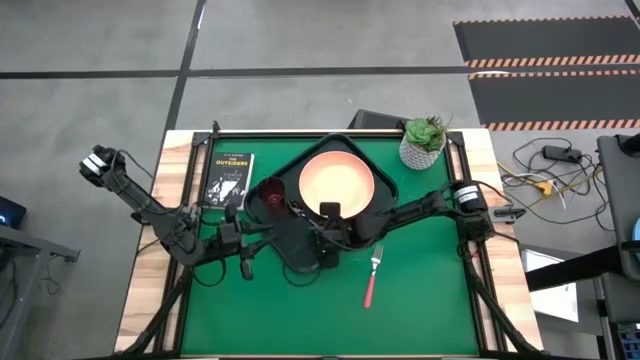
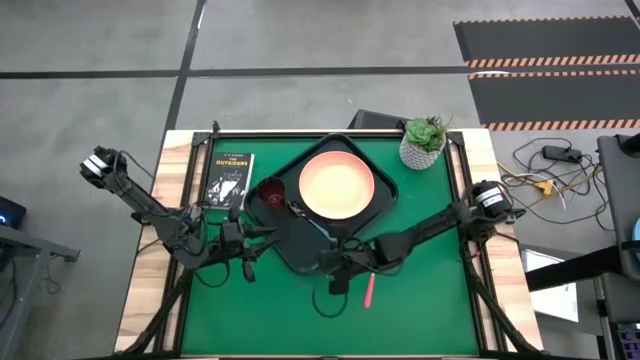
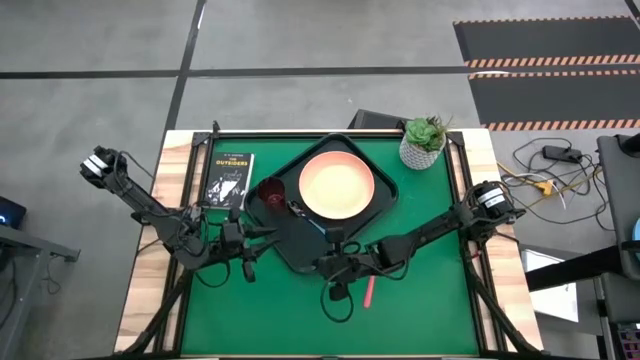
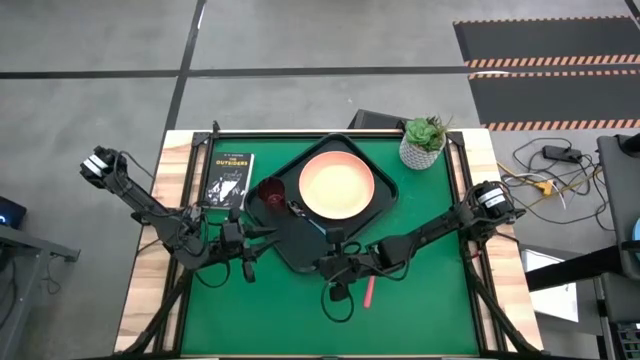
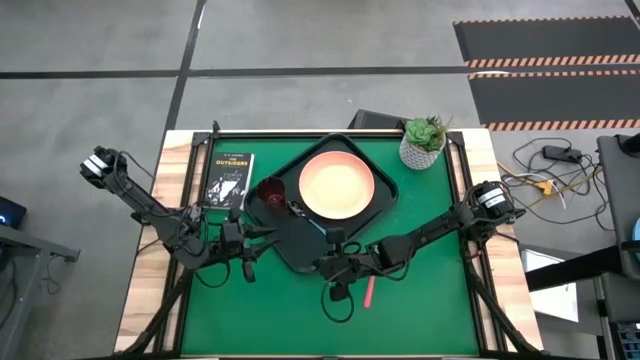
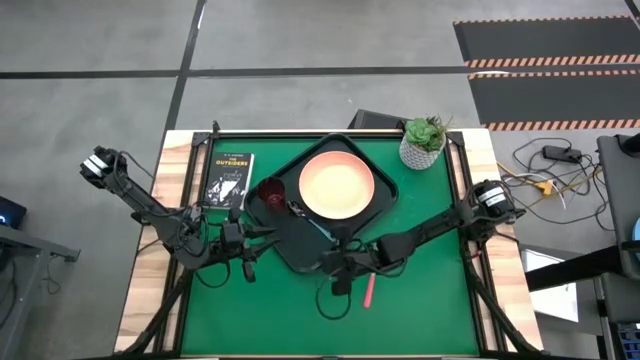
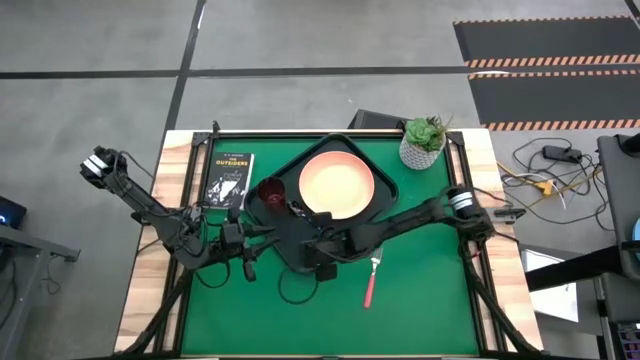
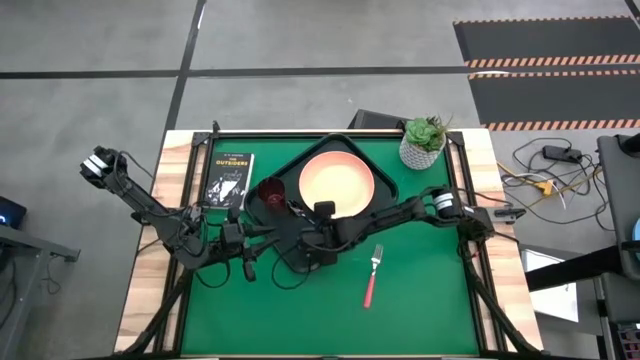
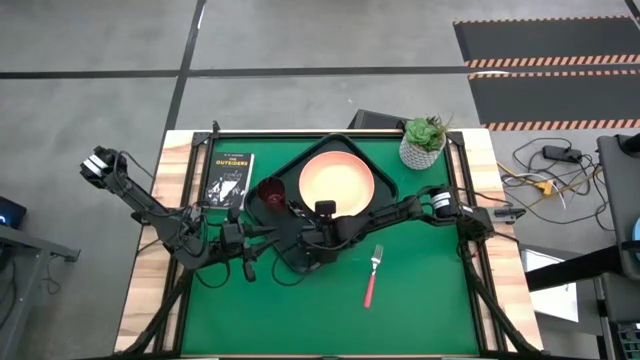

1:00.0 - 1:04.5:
Task: Pick and place plate/cup/fork/spoon on tray
Adjust the blue spoon on the black serving tray

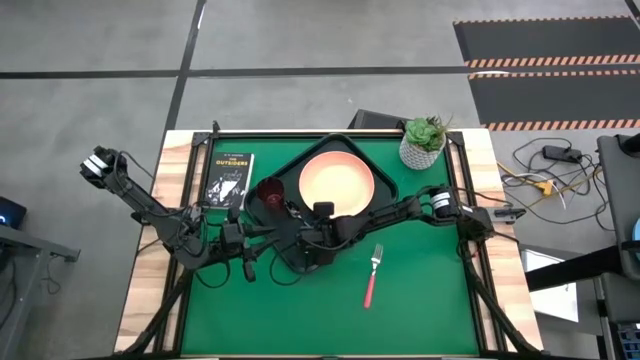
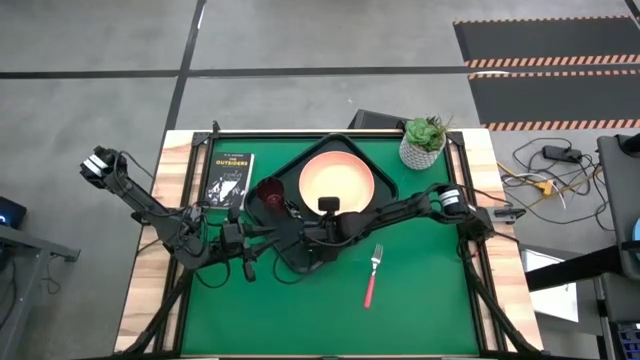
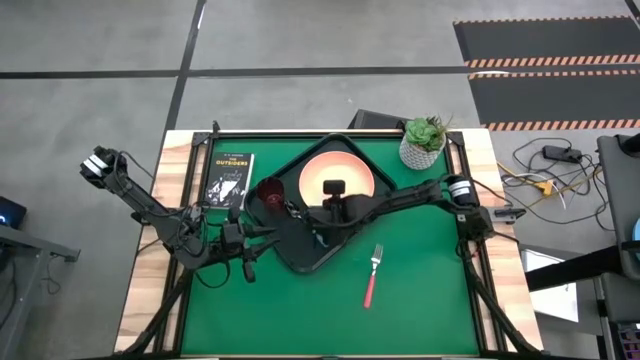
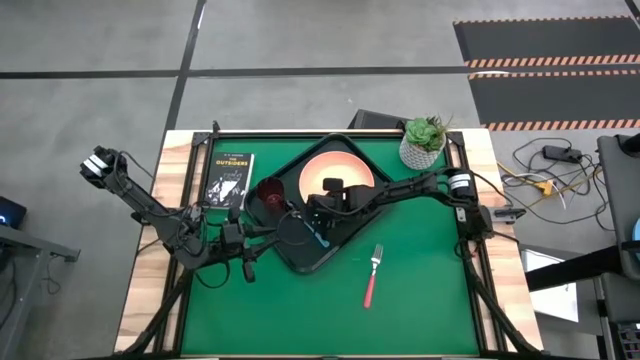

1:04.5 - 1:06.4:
Adjust the orange plate on the black serving tray

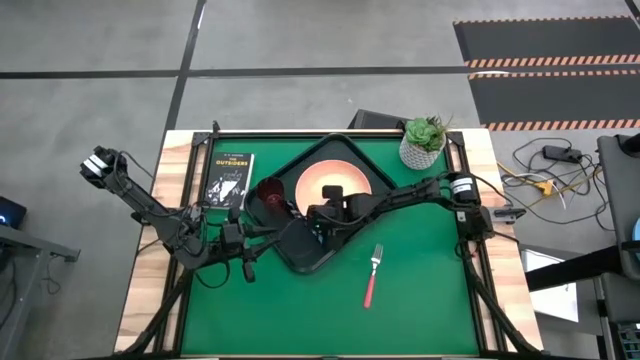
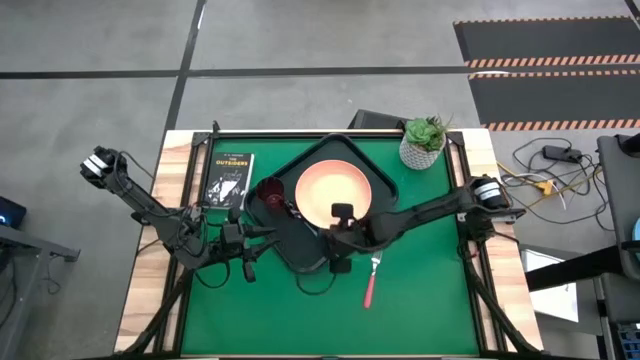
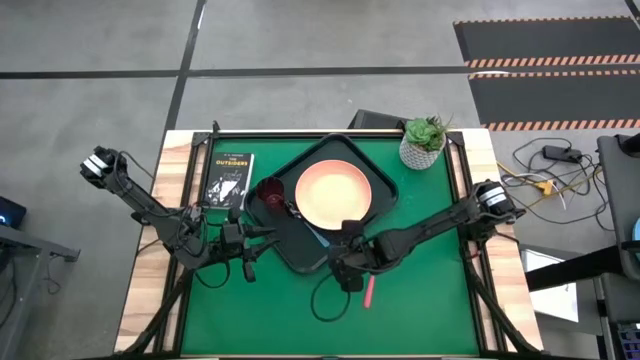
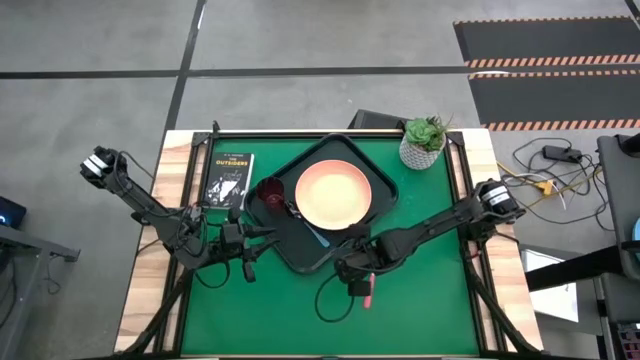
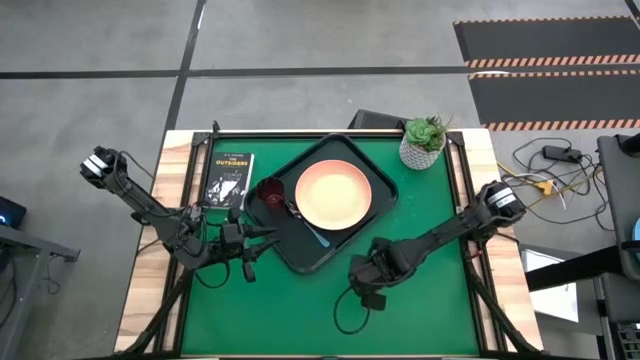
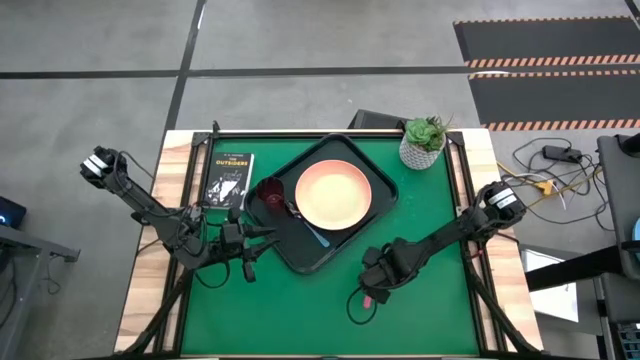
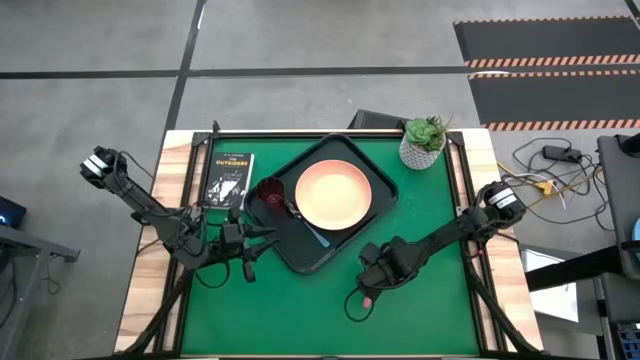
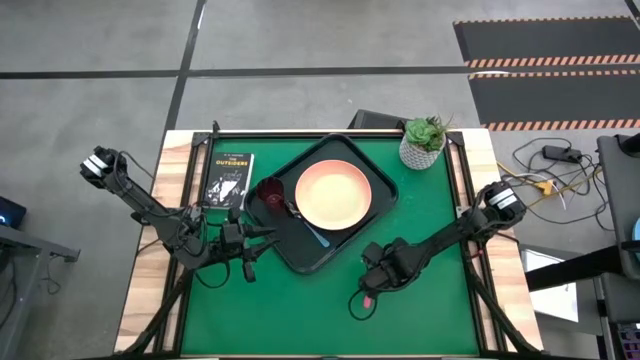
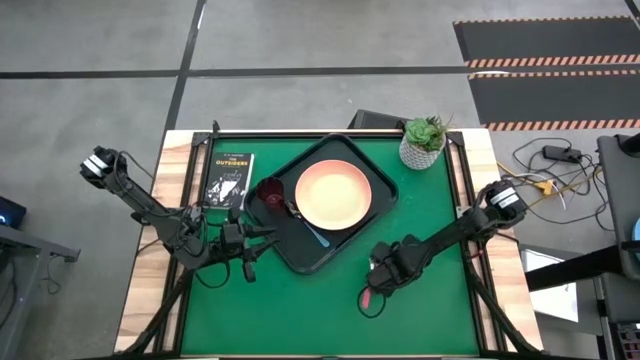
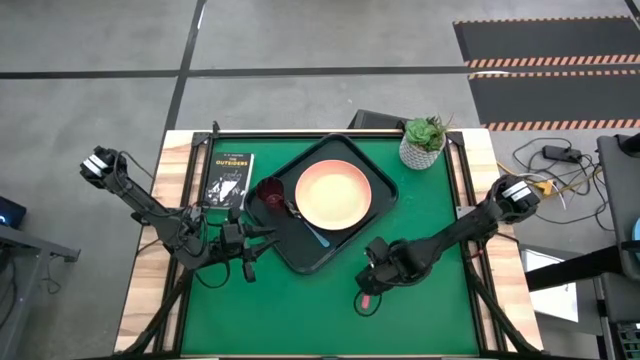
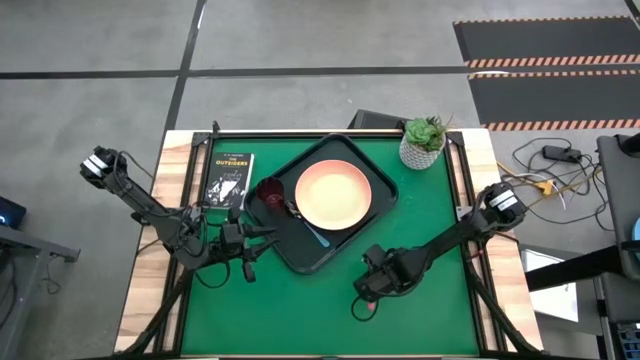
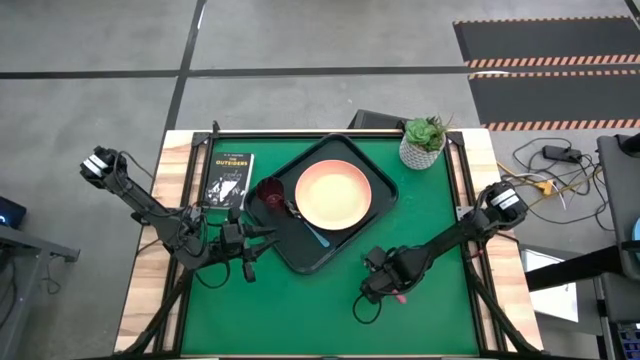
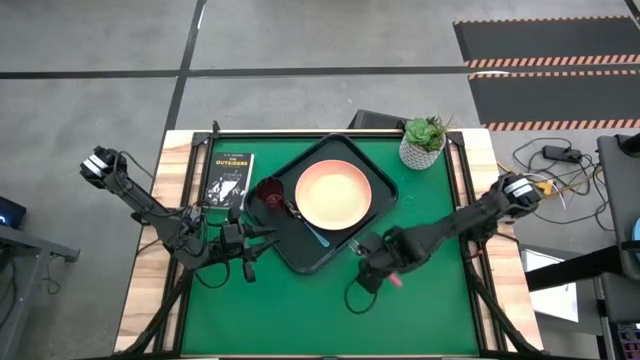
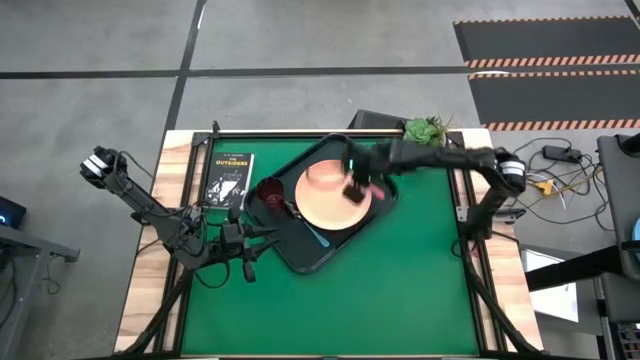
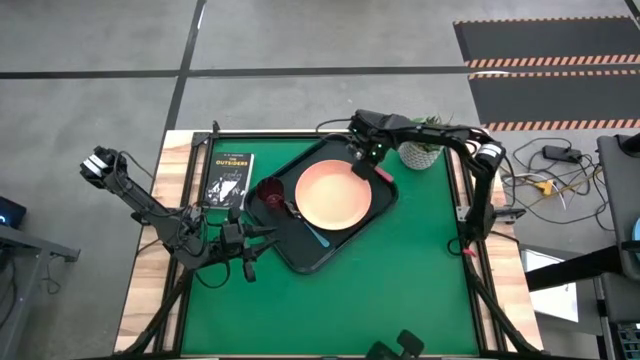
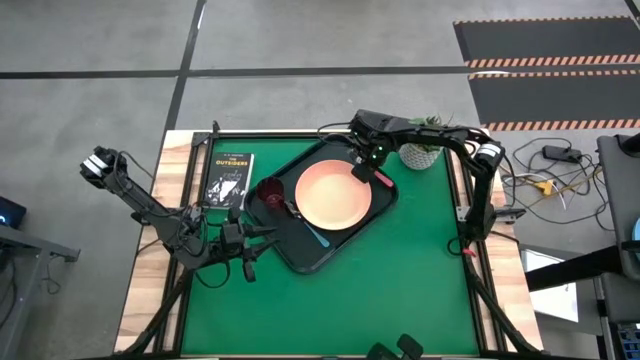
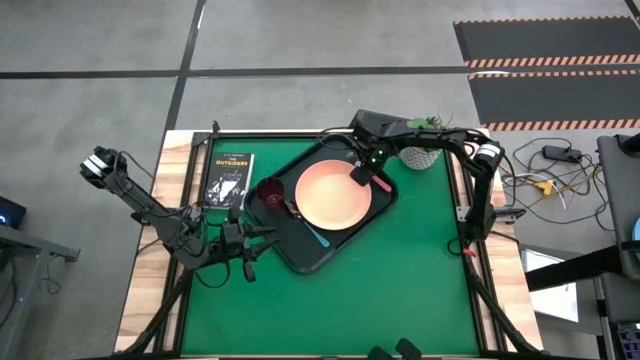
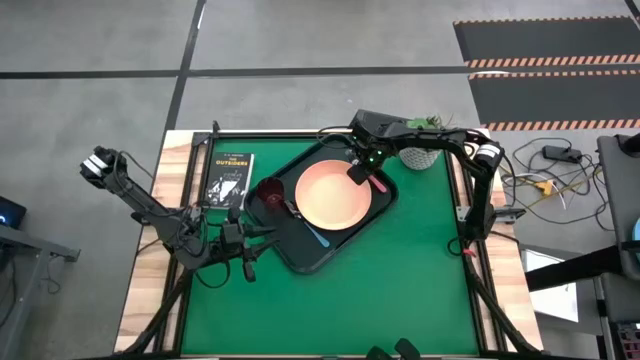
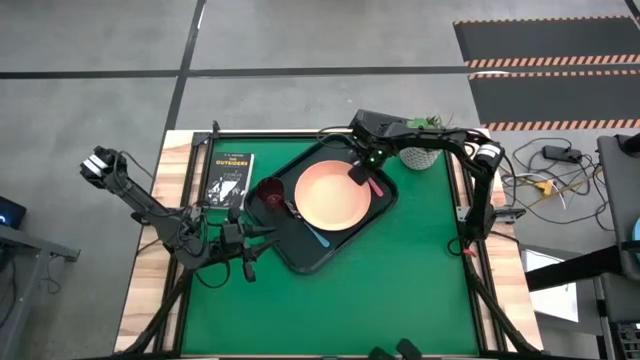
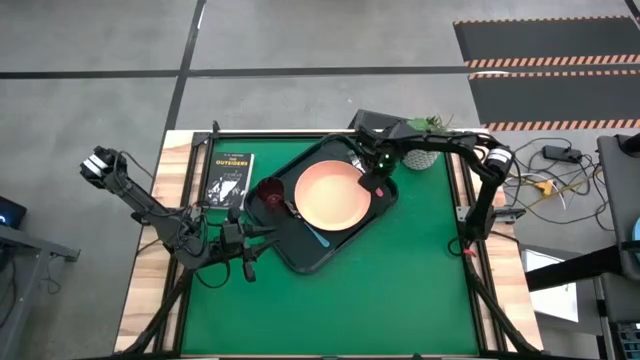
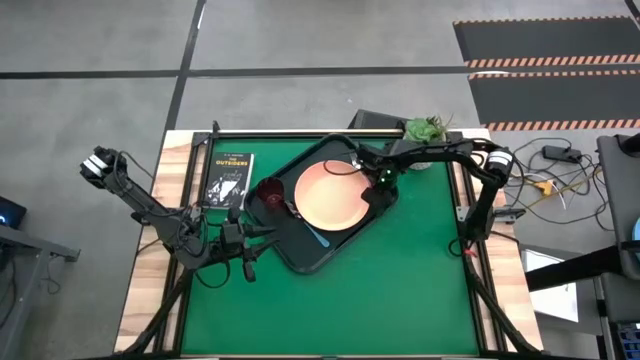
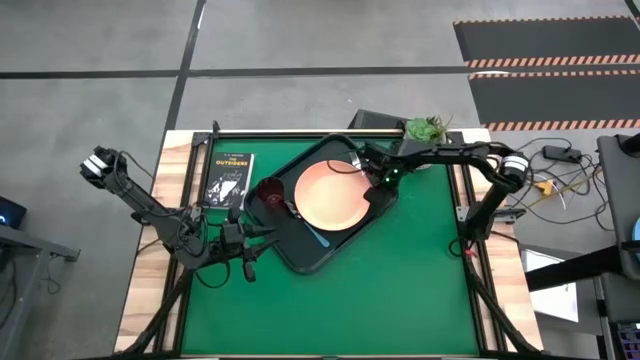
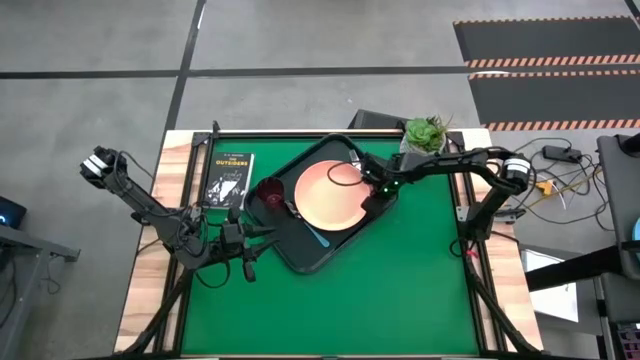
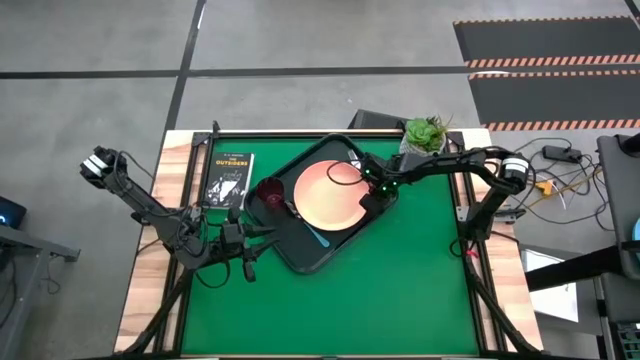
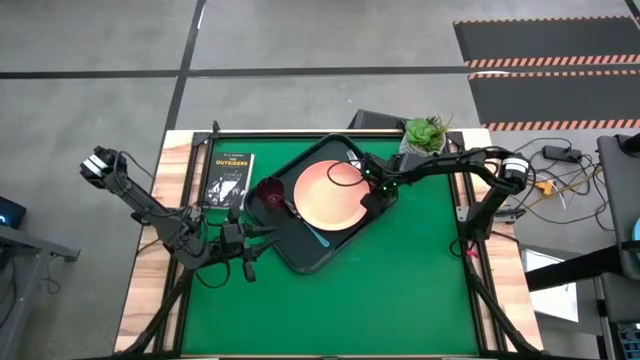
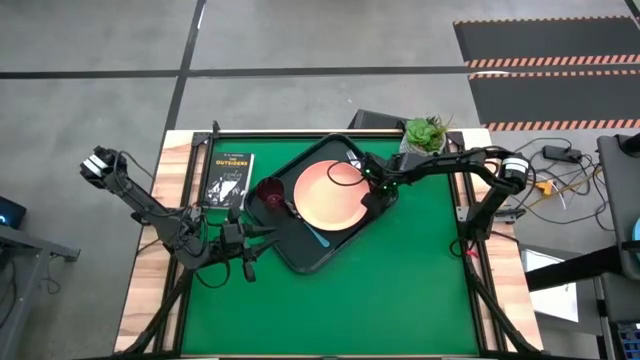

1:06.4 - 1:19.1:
Put the red fork on the black serving tray to the right of the orange plate

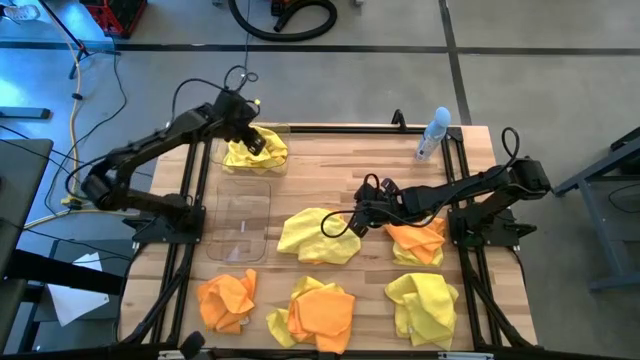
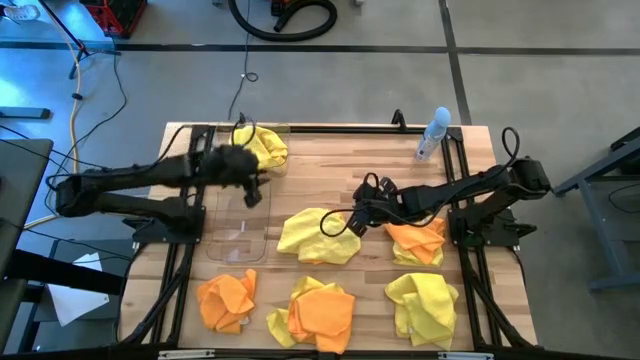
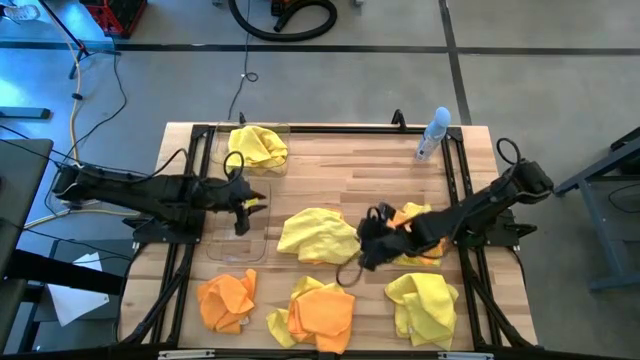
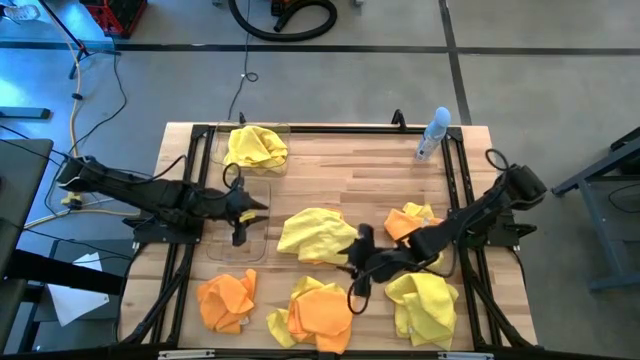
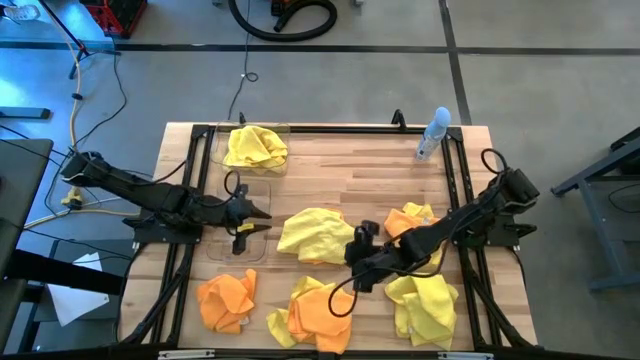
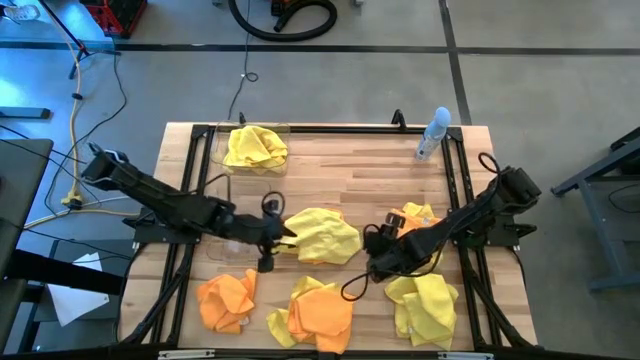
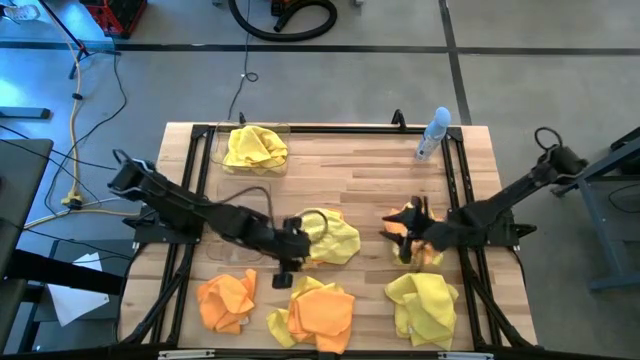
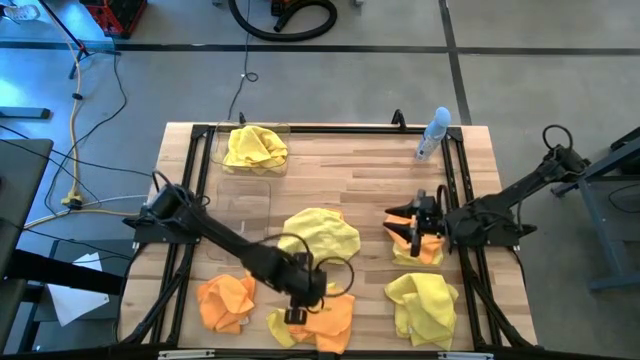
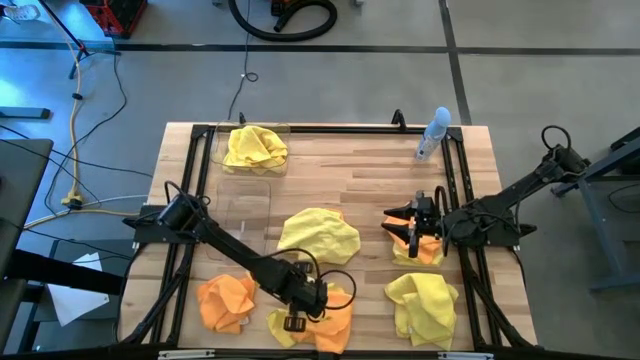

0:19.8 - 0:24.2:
Task: Sort microfiber towel by color & place in baskets
Put the orange microfiber towel into the bottom transparent bin
